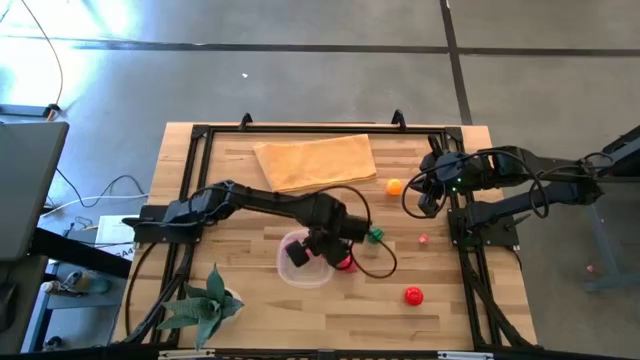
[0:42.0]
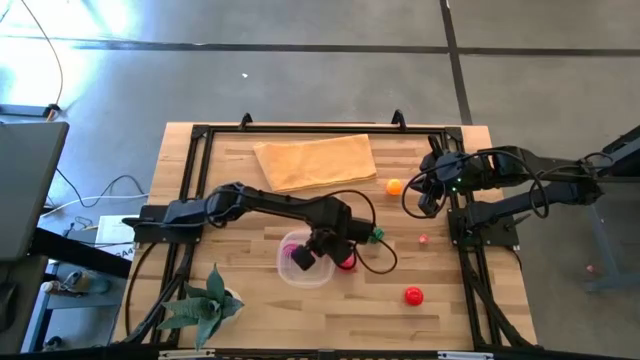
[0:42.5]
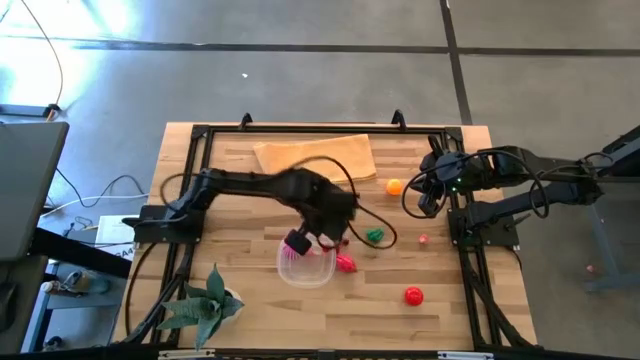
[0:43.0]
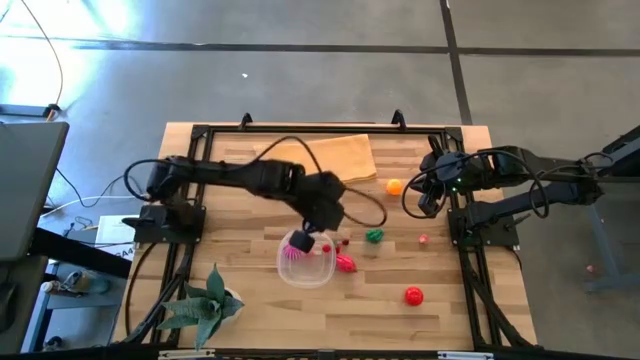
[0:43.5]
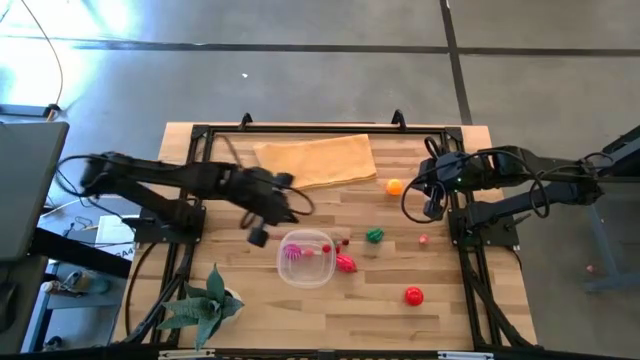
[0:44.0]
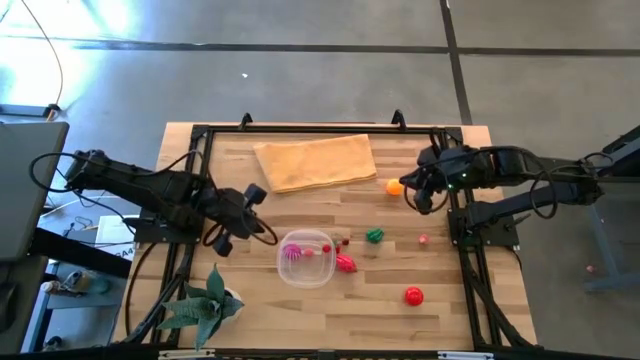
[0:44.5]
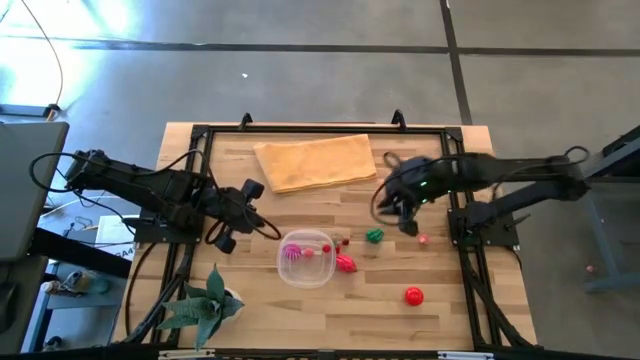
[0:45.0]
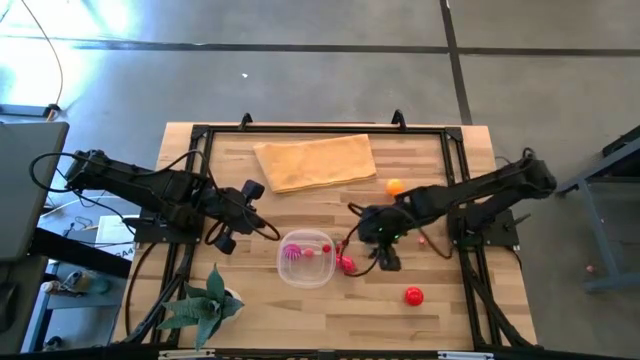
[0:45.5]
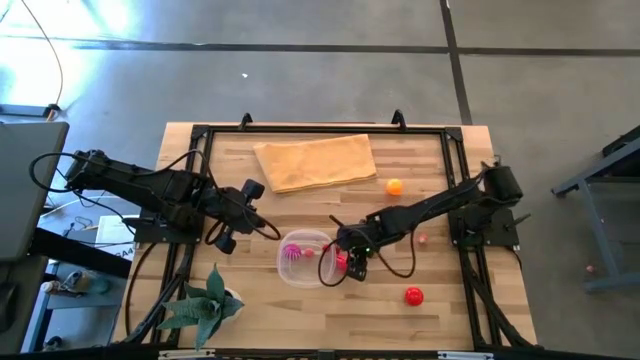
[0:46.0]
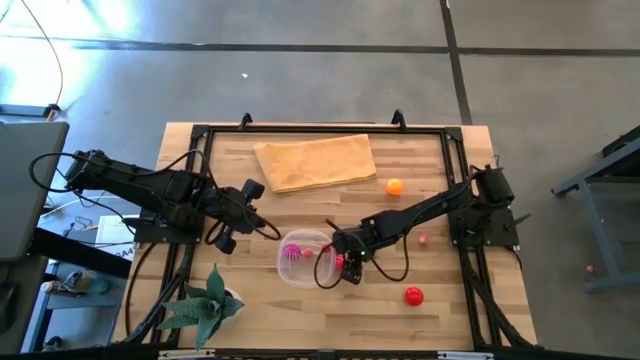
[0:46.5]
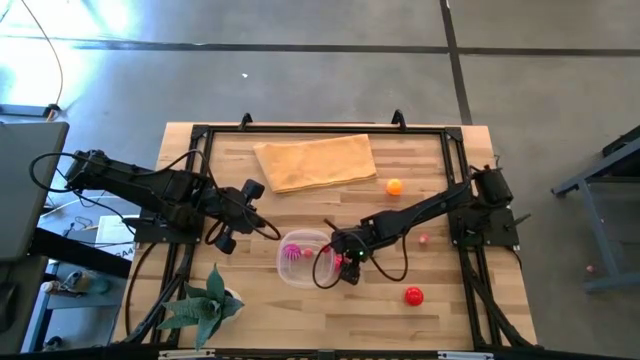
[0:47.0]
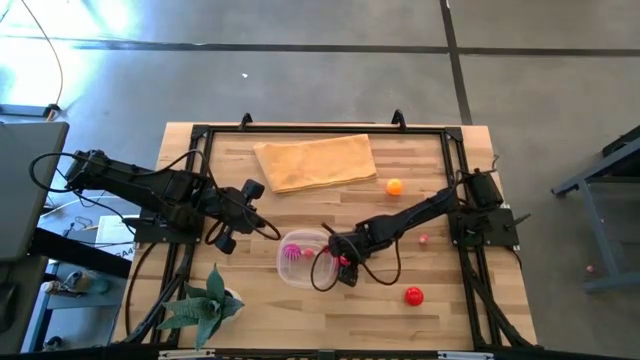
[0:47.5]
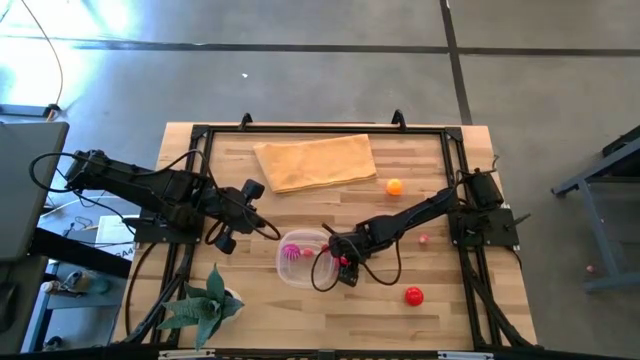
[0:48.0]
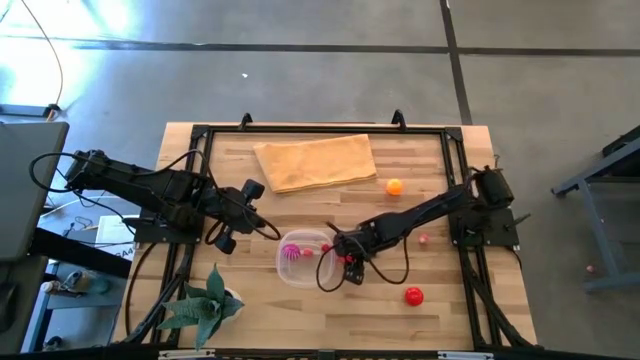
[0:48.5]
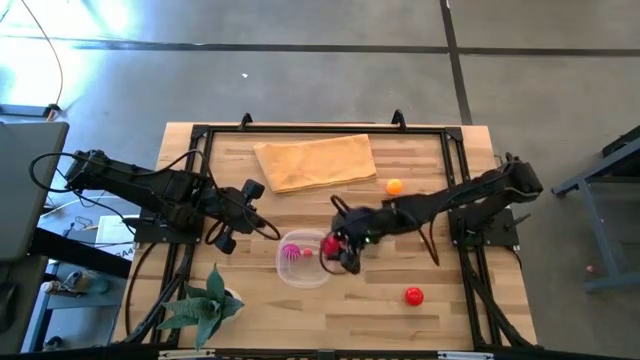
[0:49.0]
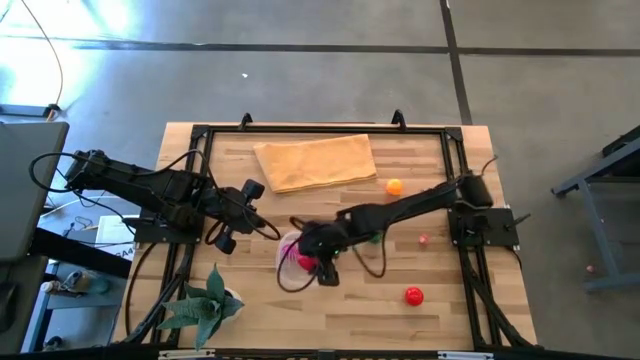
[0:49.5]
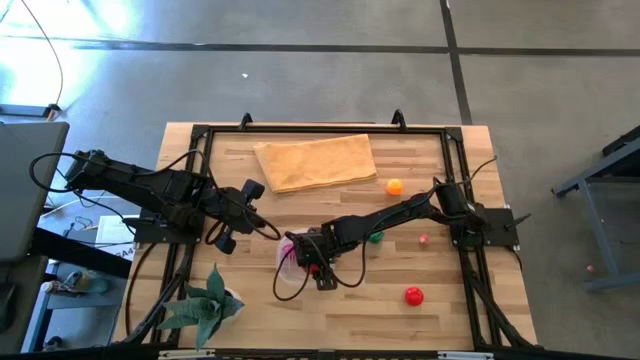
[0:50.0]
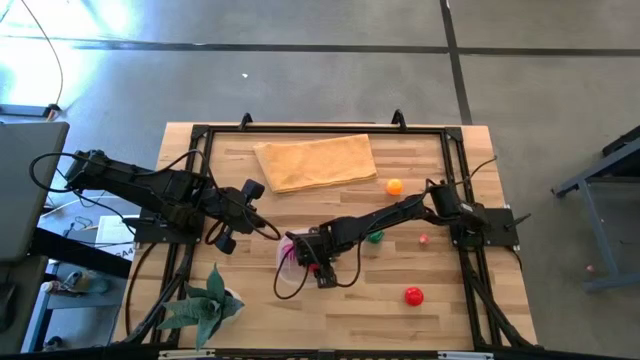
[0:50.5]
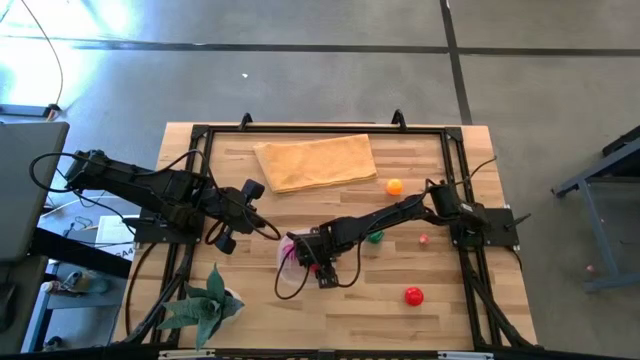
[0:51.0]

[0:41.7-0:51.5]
Task: Pick and placing Produce into tupperware
Put the pink dragon fruit into the transparent bin

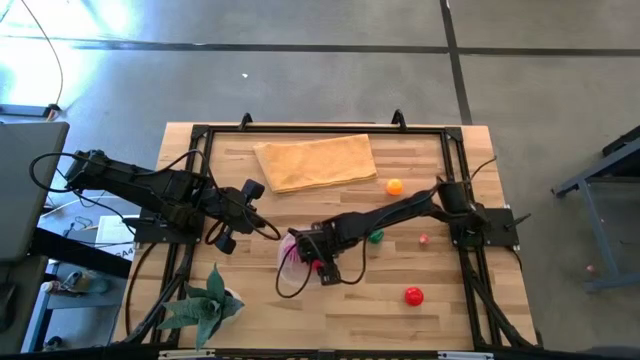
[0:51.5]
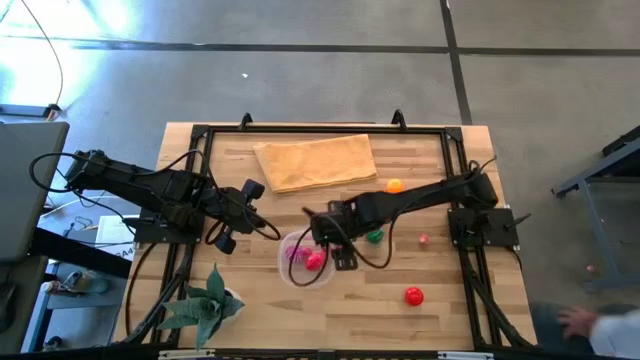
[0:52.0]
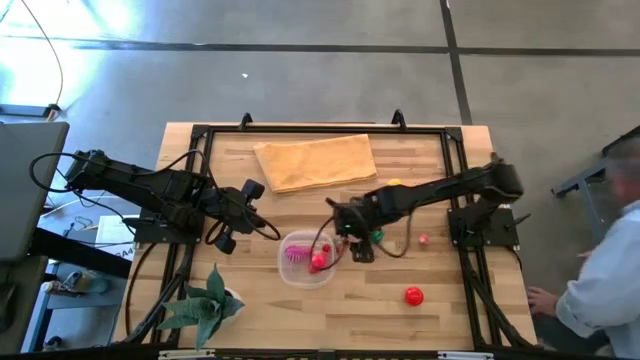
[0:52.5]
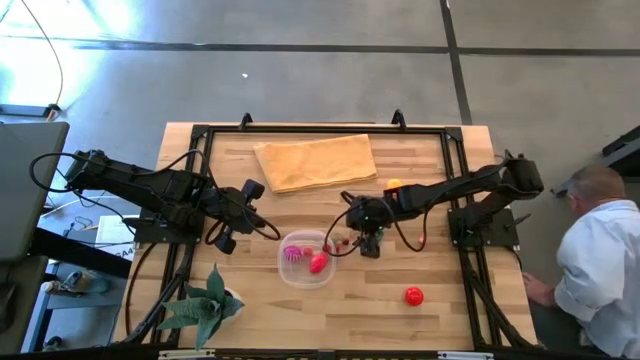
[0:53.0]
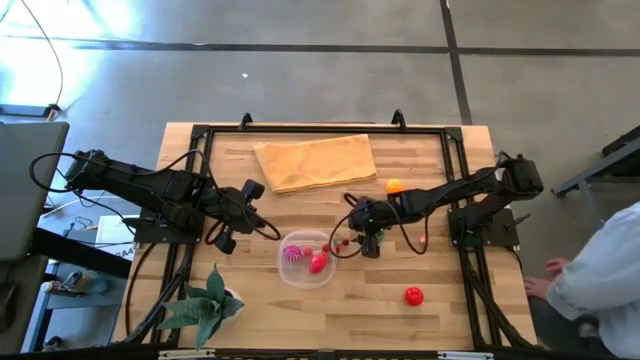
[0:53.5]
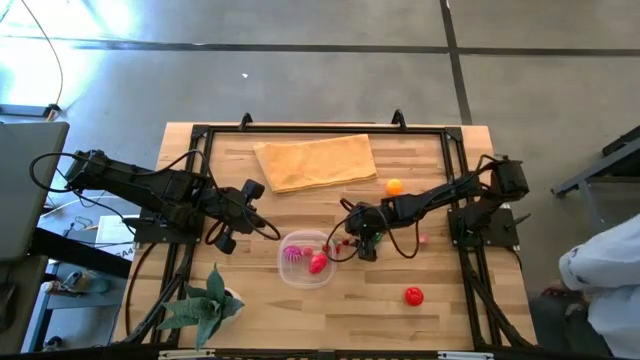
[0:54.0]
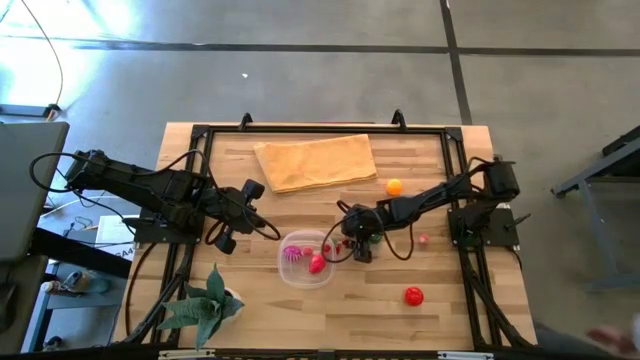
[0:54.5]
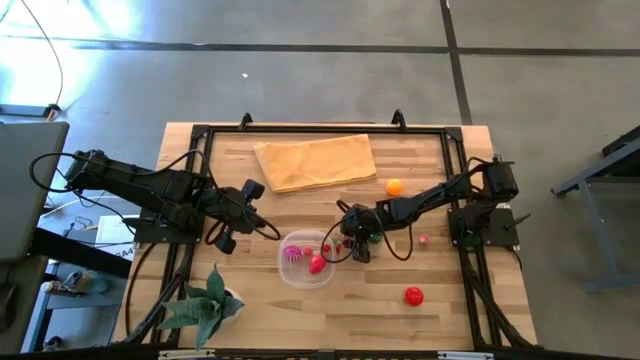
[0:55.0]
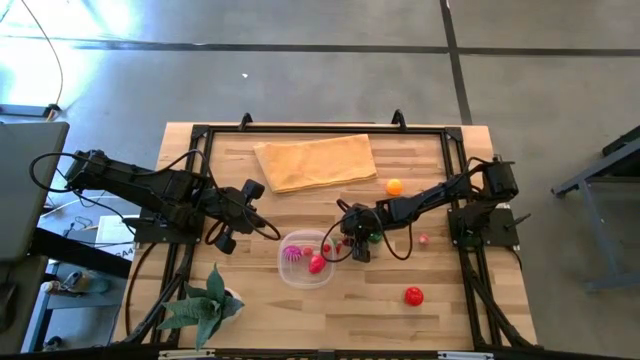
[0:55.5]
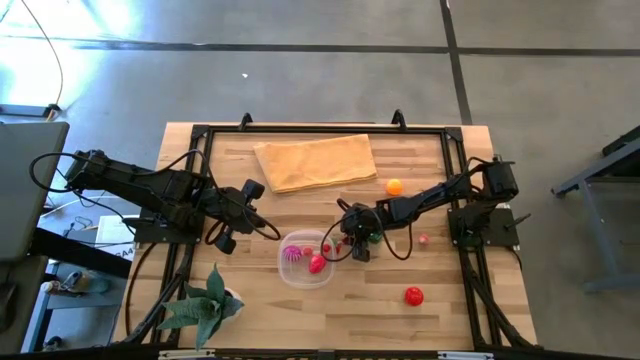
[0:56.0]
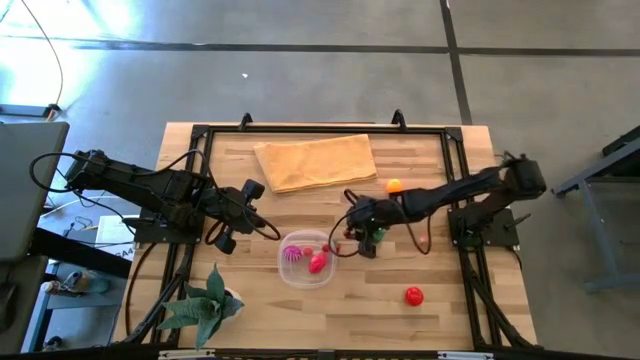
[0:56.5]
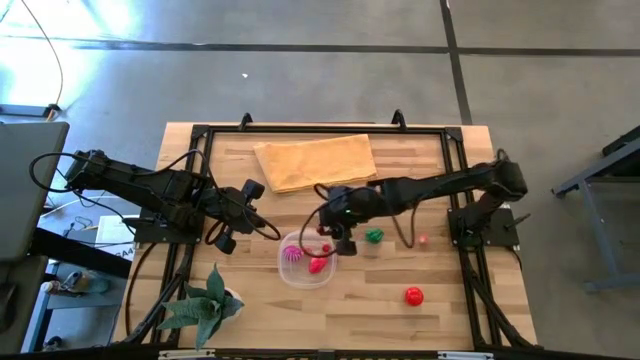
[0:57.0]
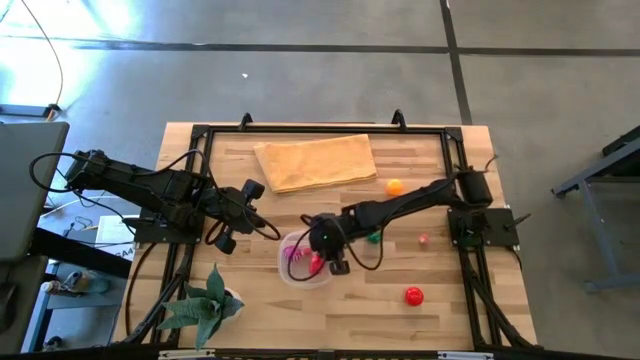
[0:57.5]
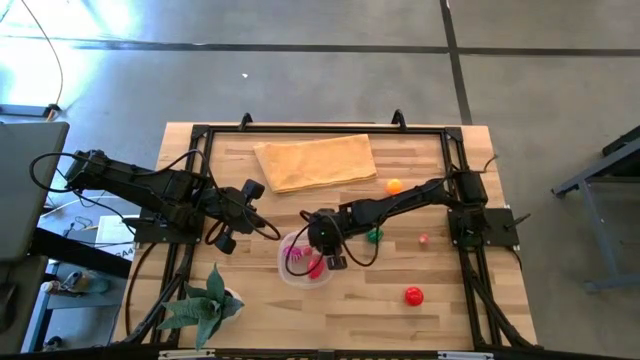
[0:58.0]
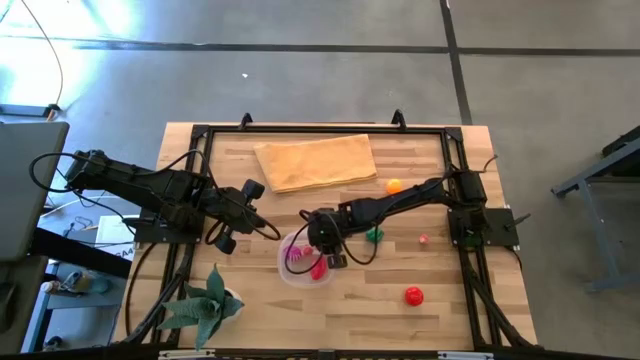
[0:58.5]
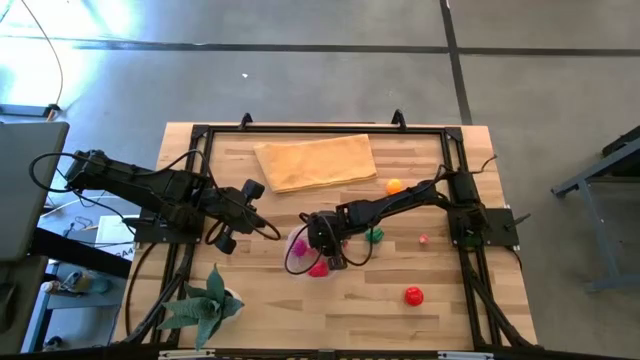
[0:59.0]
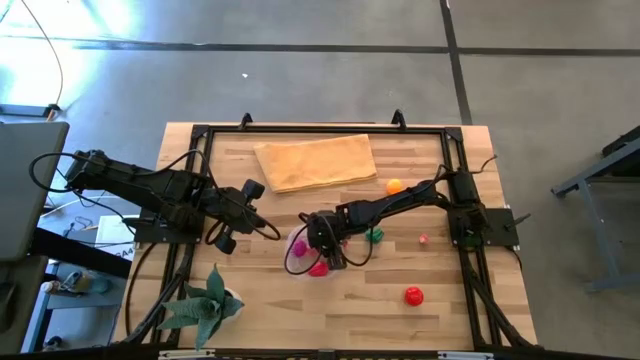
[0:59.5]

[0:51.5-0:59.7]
Put the red cherry into the transparent bin

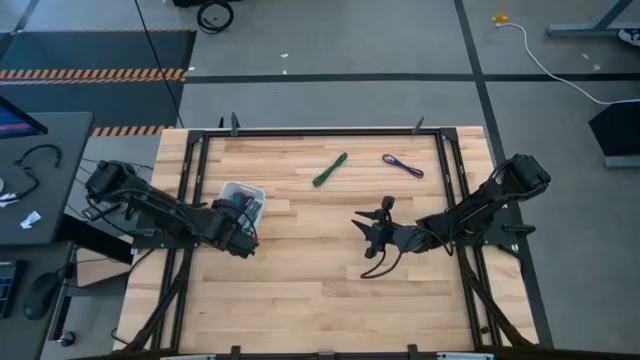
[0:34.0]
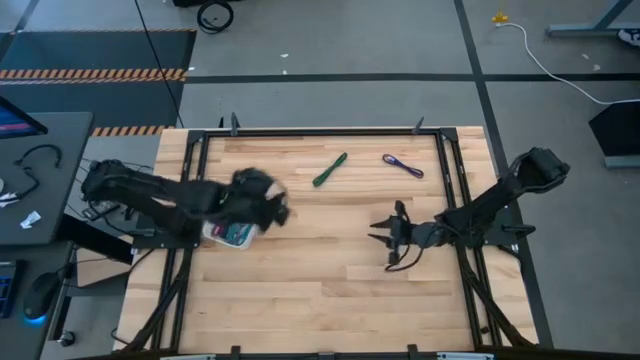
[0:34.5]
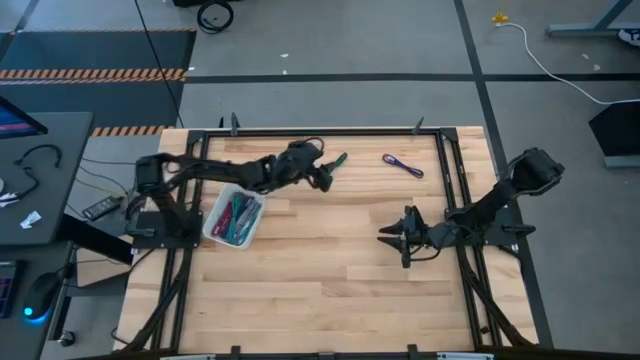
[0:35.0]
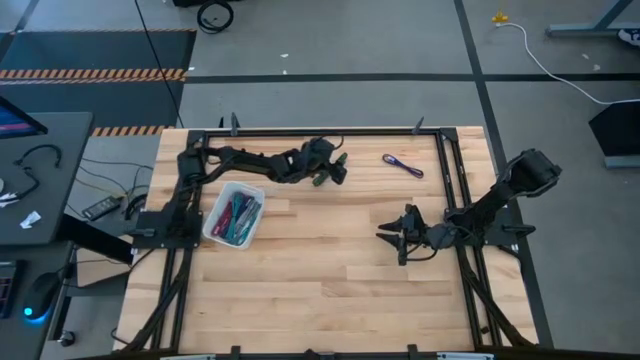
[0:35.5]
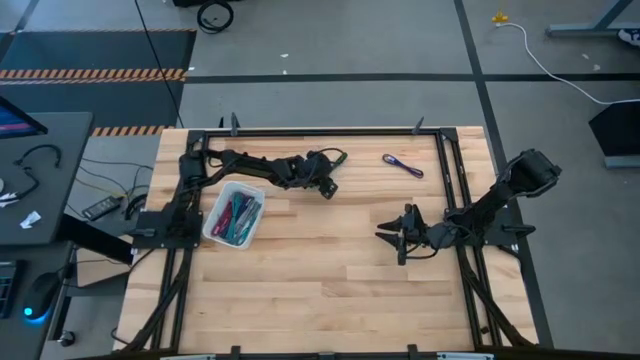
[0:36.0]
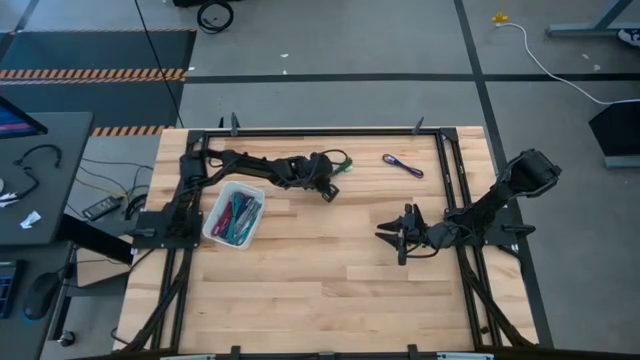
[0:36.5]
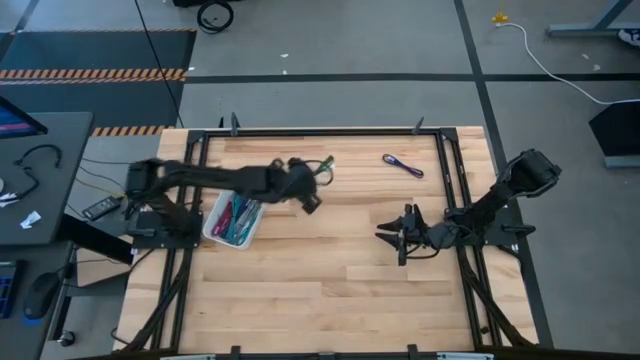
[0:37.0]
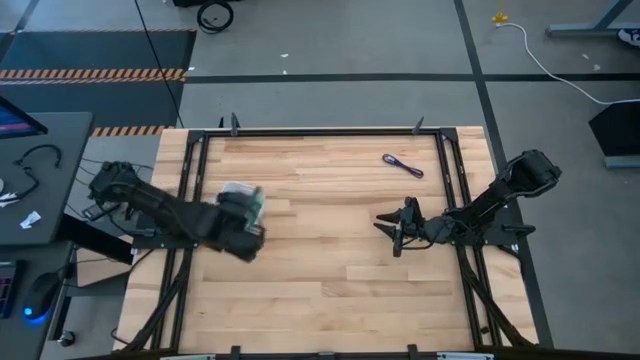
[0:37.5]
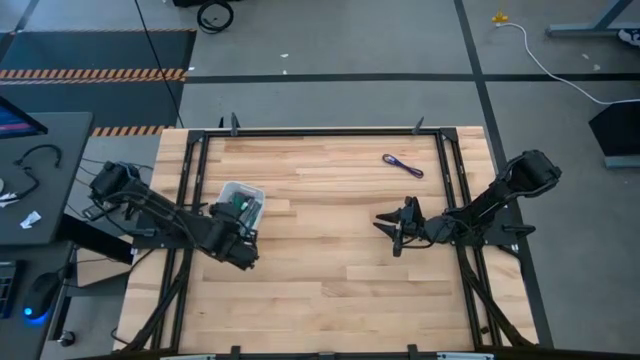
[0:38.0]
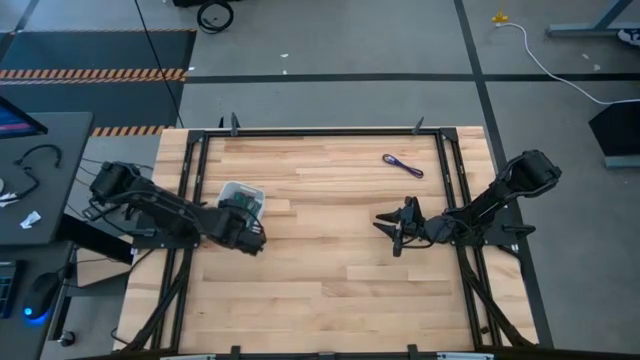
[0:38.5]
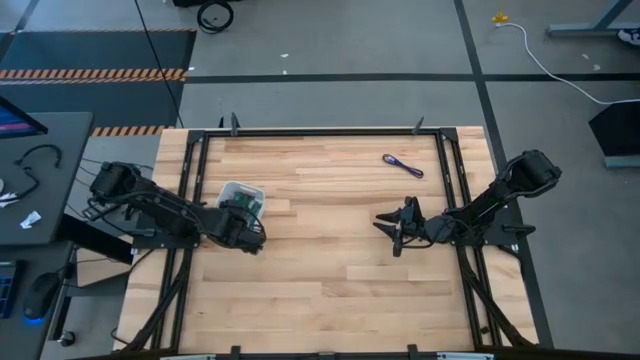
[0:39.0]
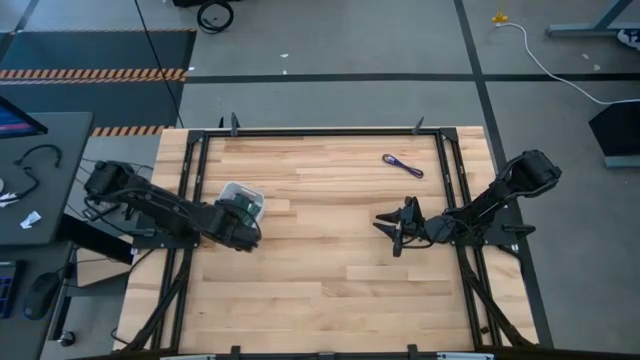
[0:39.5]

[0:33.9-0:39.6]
Task: Pick and place USB-C Cables
Put the green charger cable into the white bin
